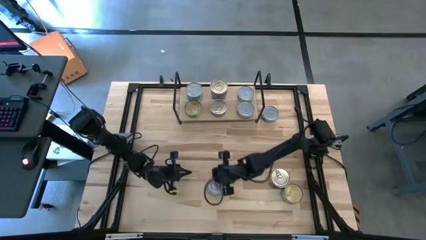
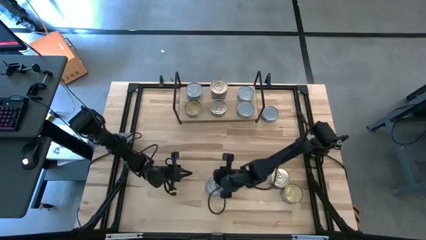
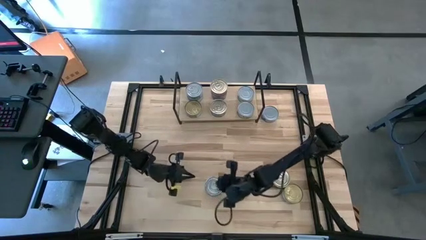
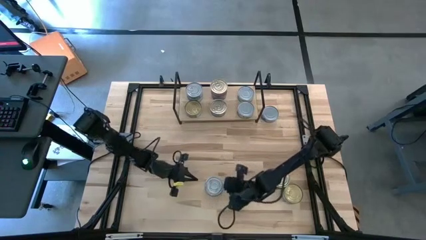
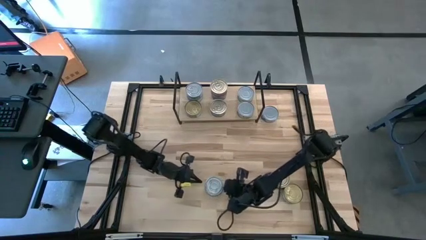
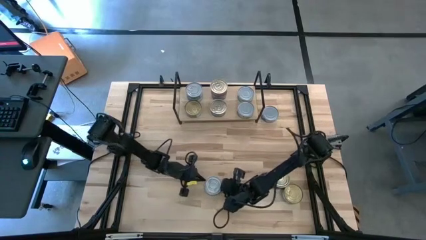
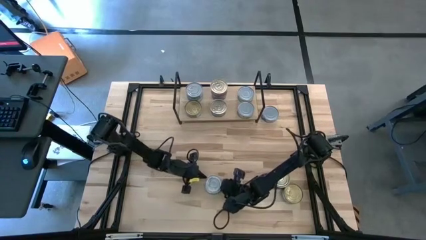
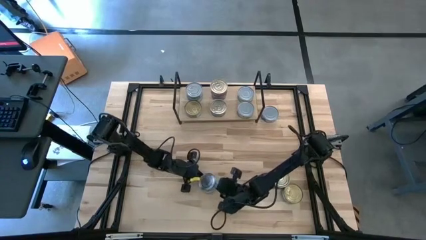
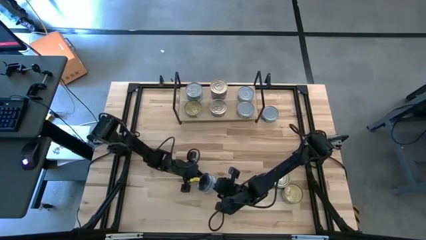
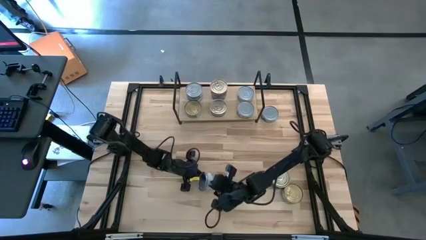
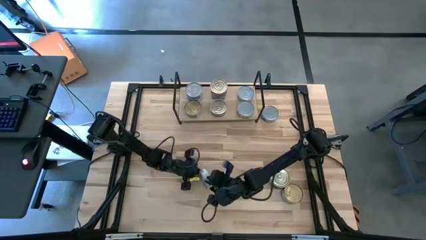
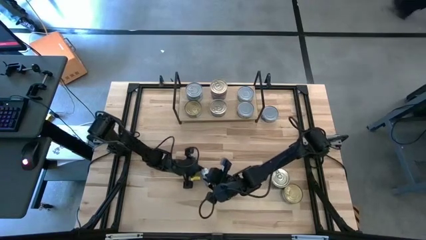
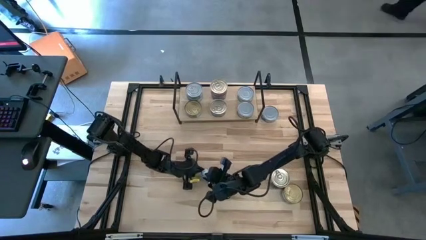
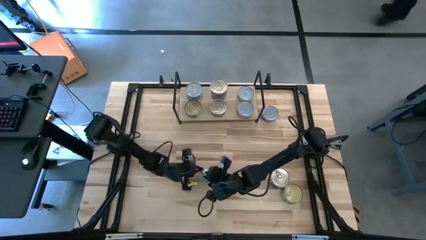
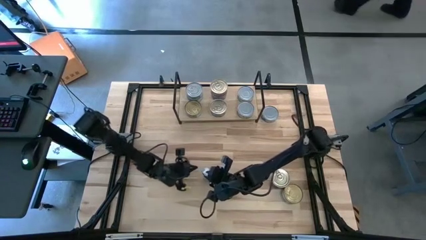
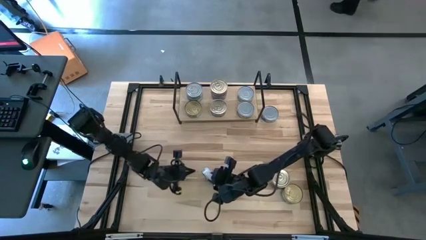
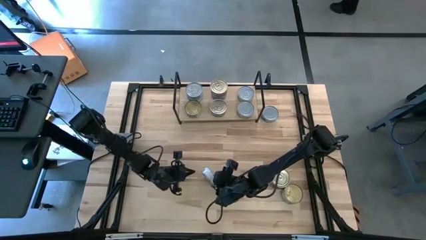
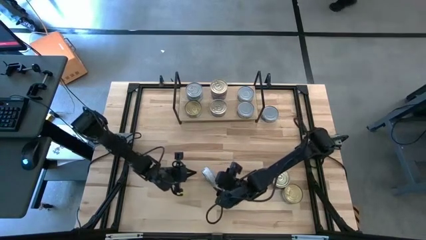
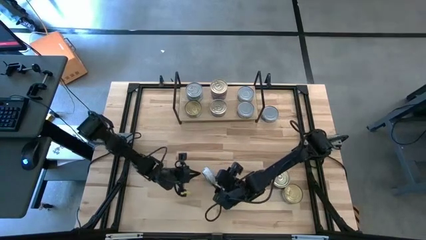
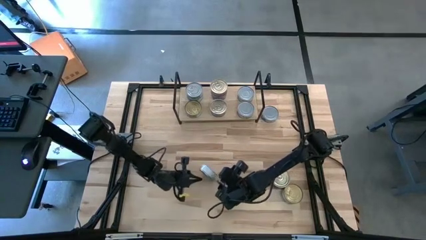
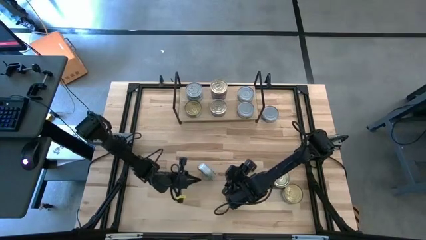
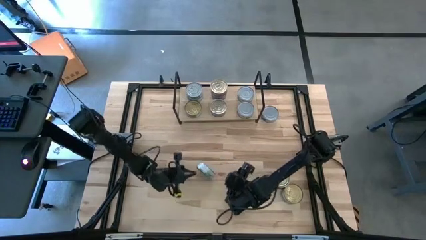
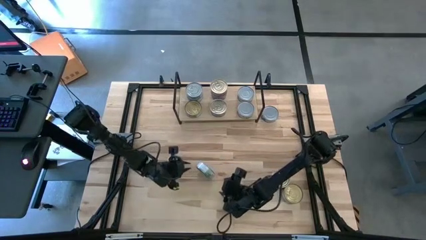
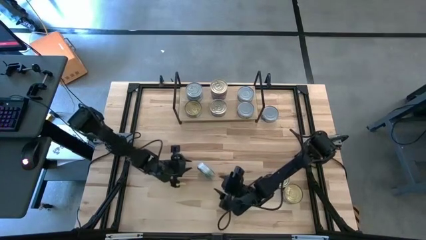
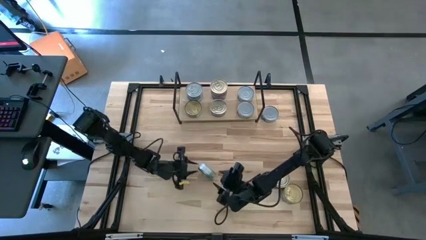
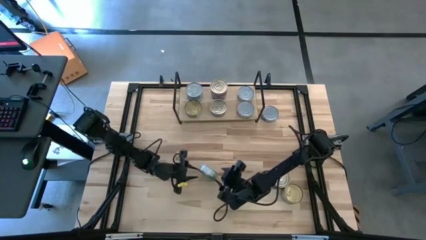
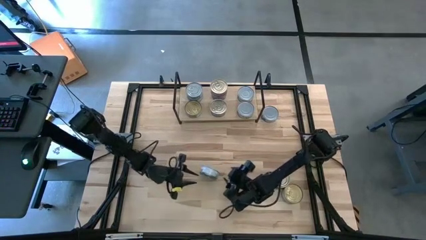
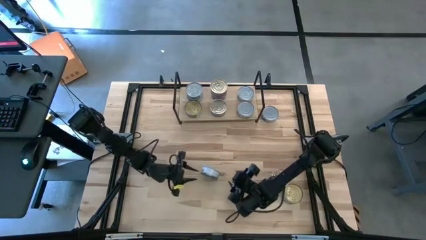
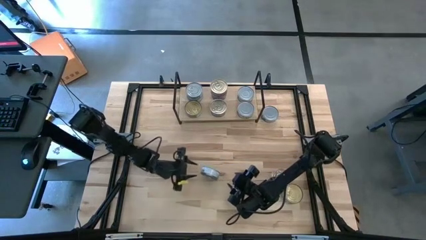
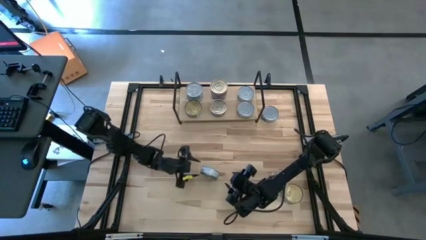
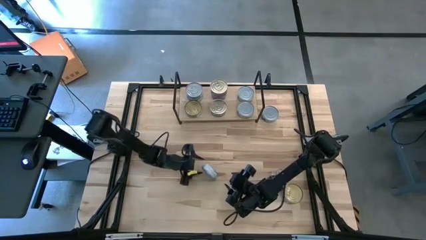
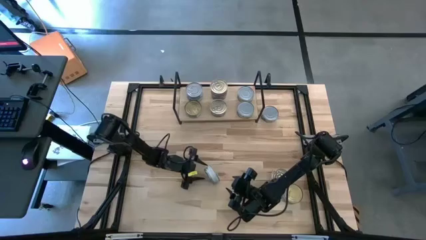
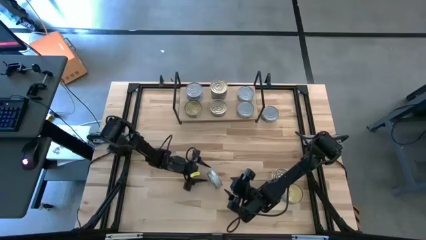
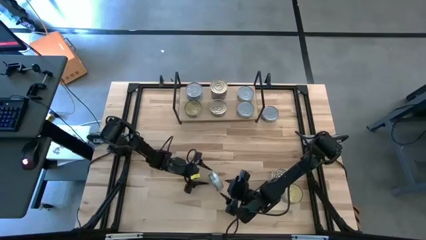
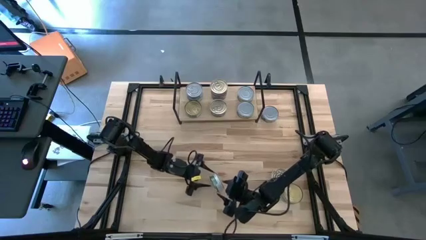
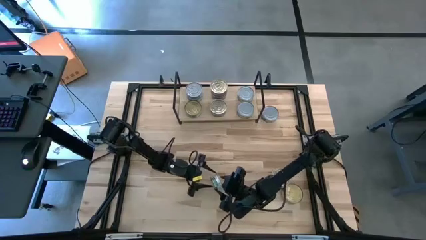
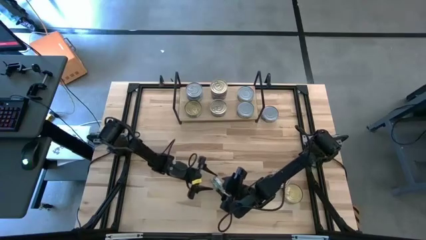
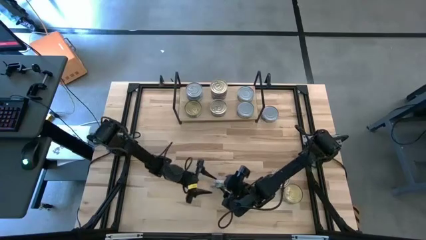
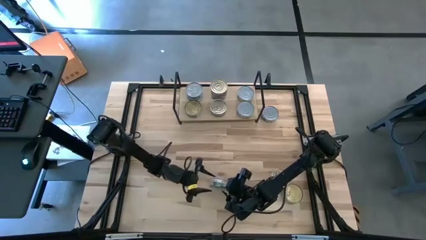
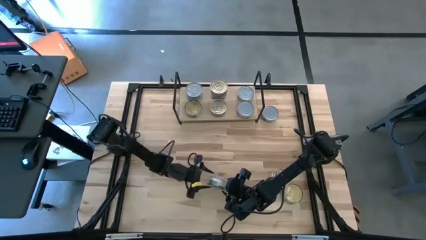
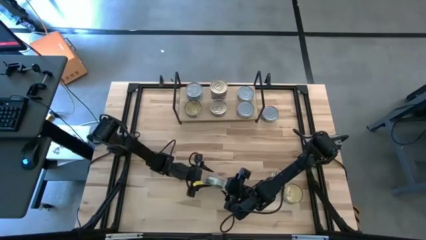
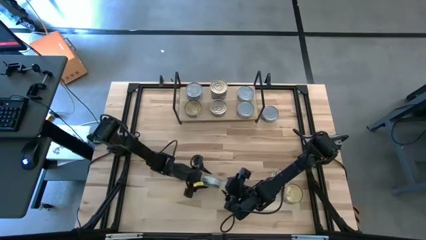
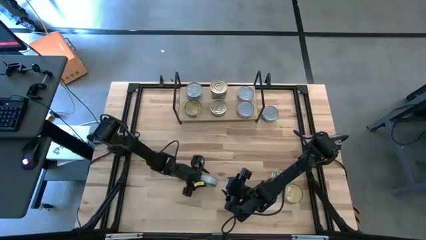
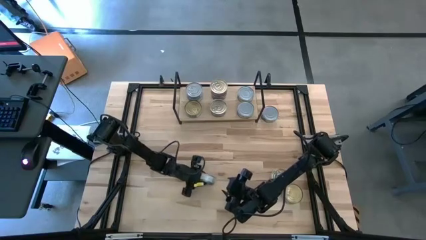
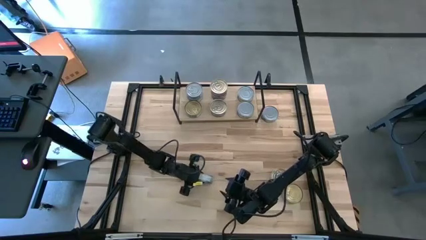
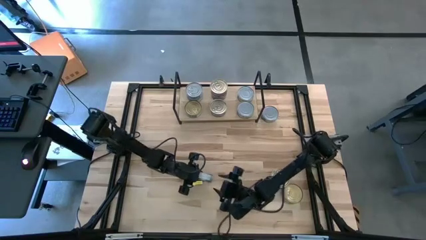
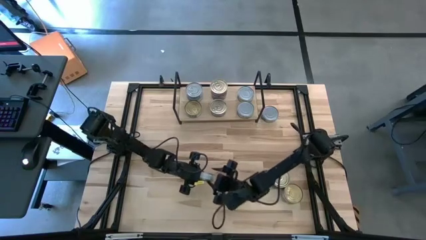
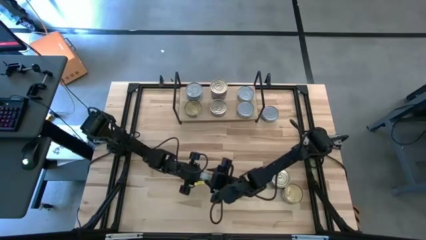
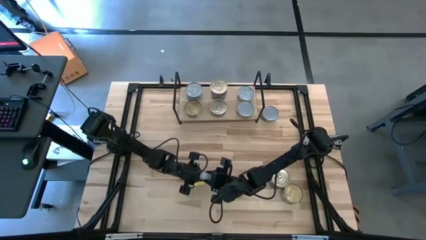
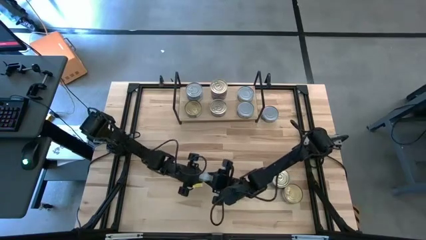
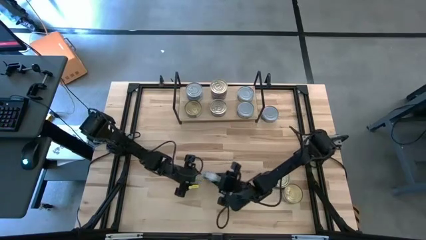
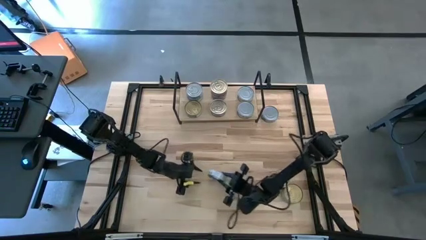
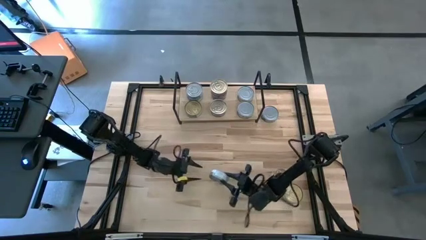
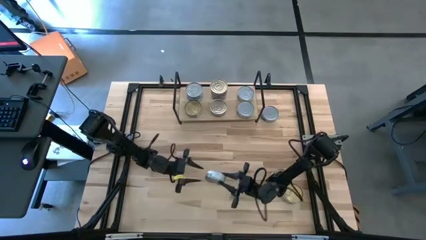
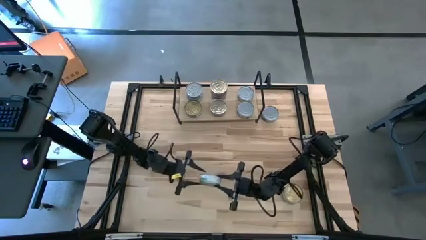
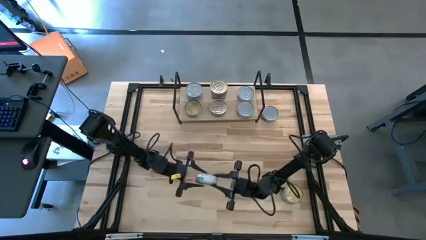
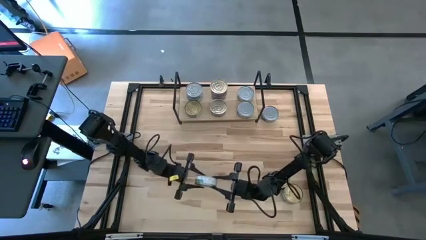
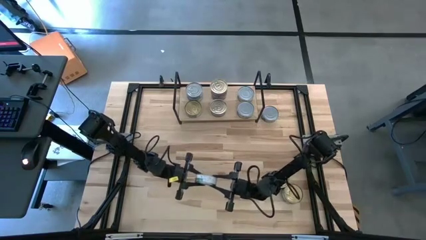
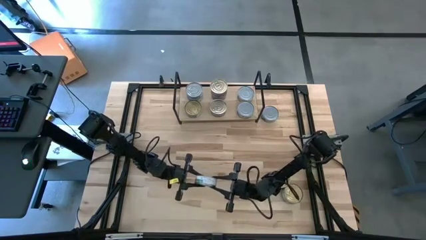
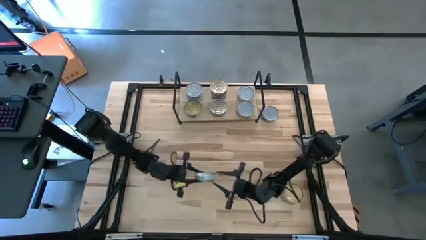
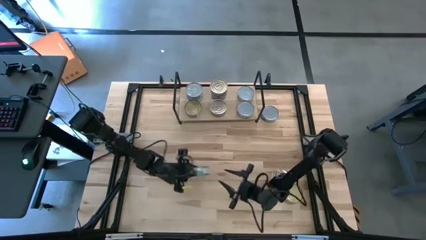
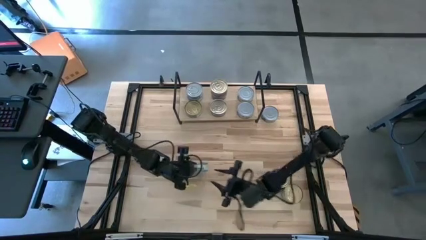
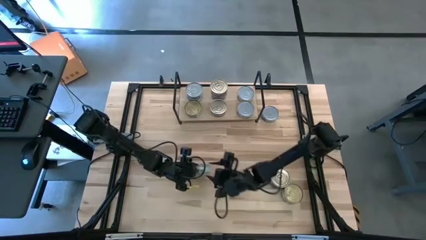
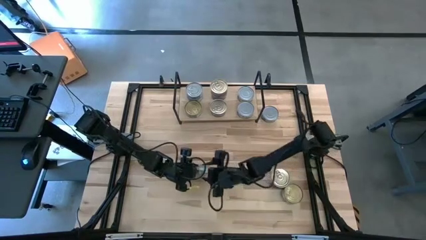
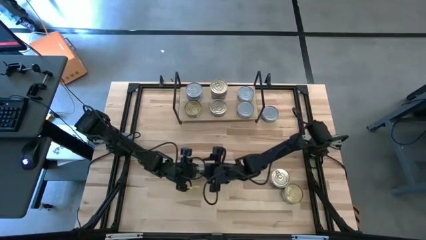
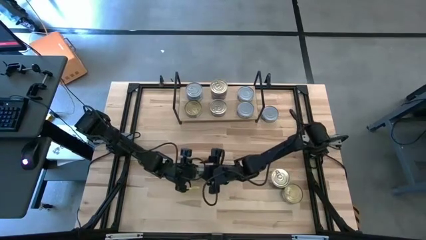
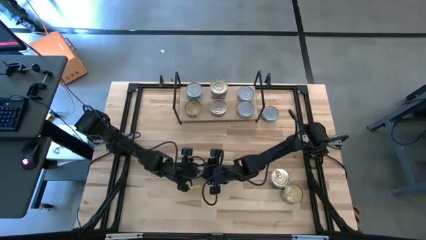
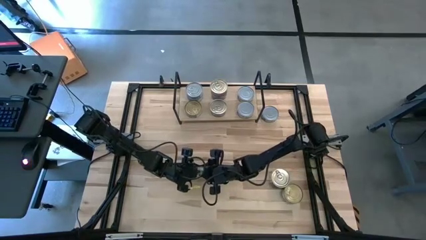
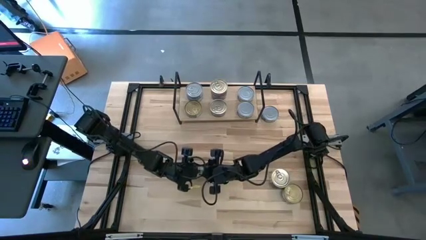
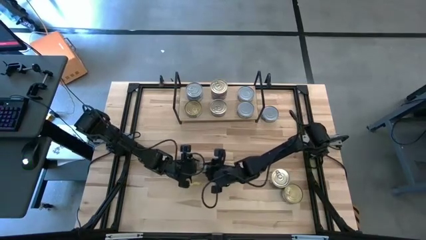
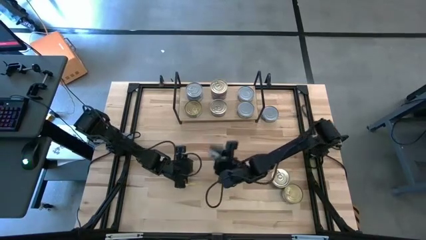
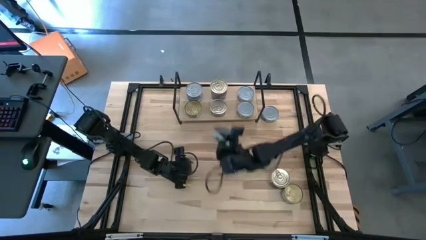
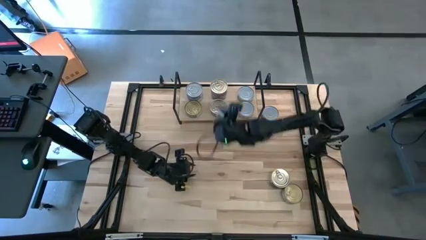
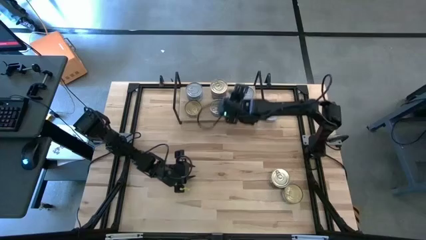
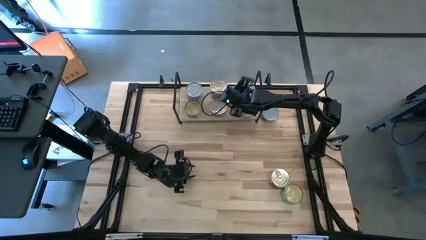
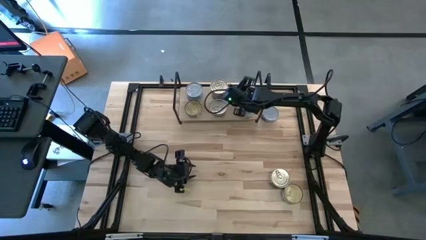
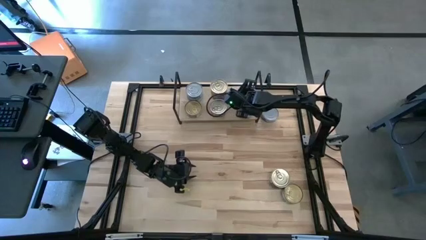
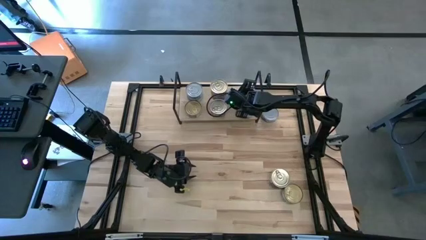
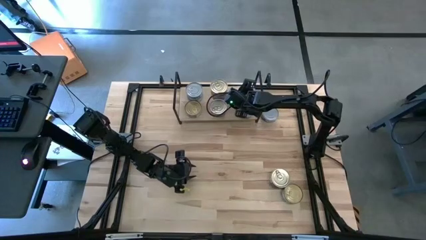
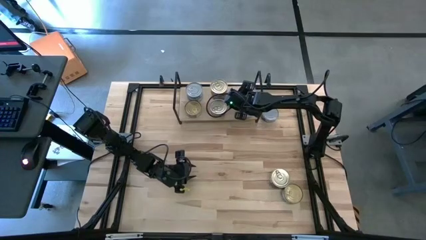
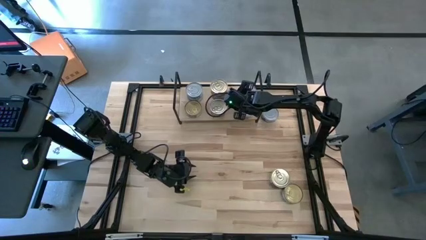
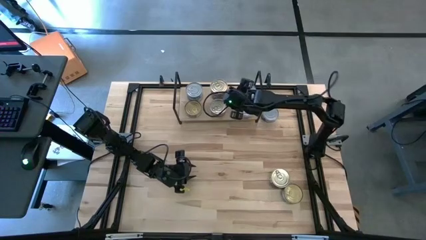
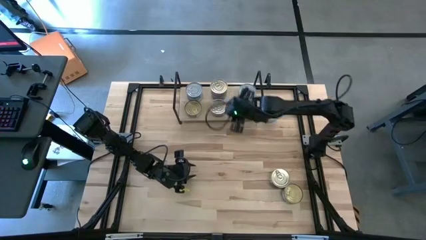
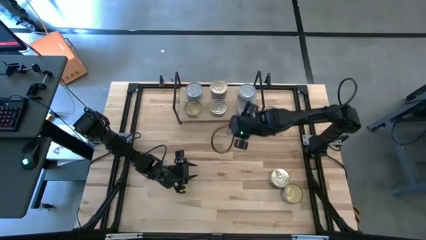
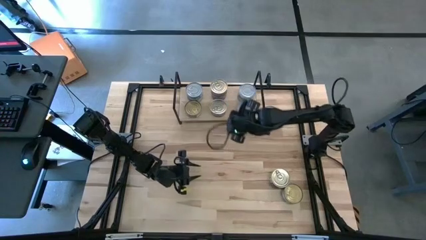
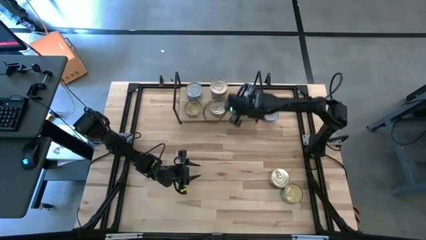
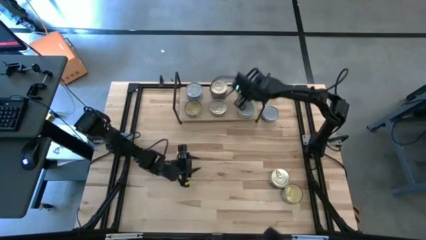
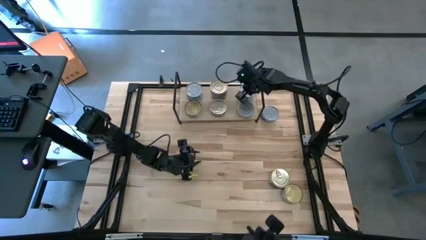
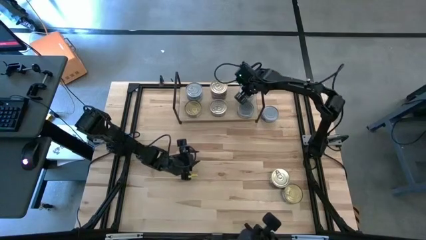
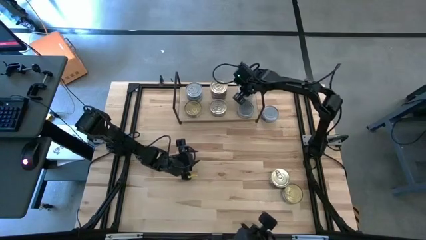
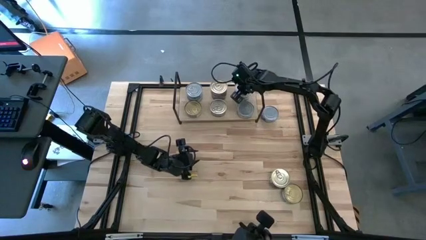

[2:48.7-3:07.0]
Task: Stack canned seafood by type on shelf
Stack the bottom green tuna can on top of the green tuna can on the back of the shelf
